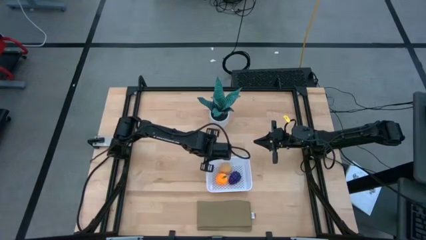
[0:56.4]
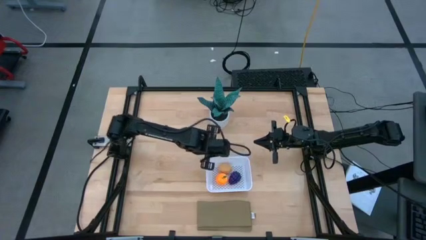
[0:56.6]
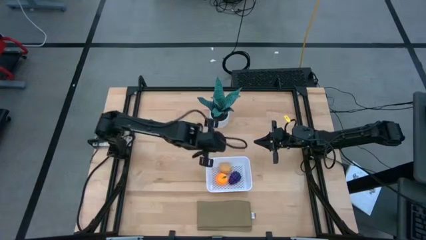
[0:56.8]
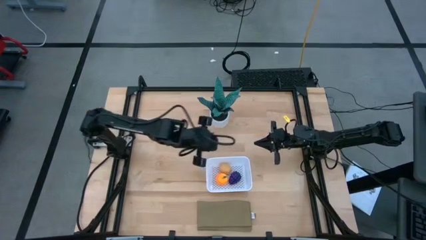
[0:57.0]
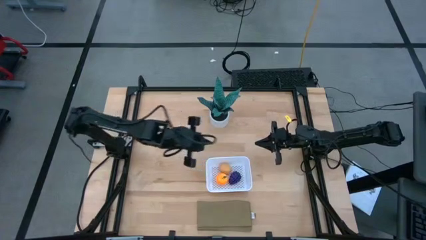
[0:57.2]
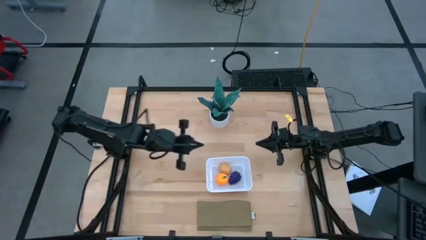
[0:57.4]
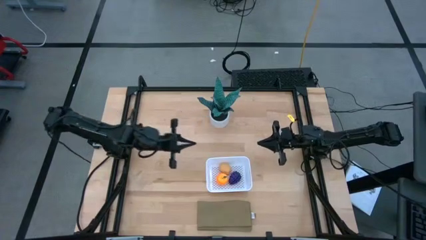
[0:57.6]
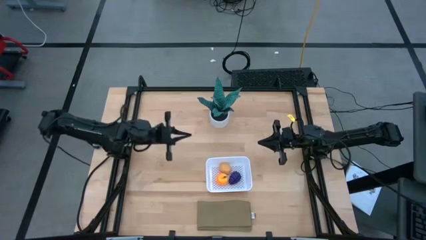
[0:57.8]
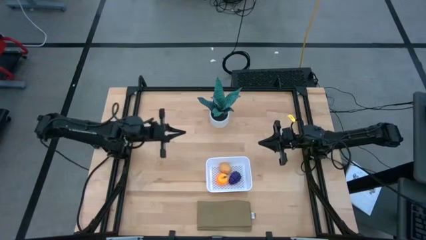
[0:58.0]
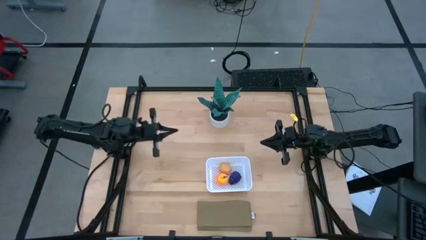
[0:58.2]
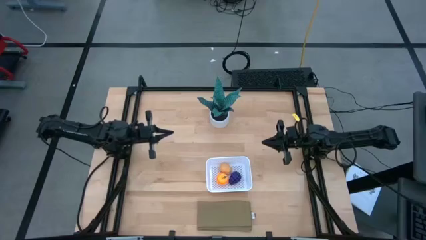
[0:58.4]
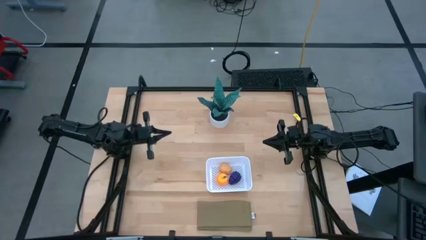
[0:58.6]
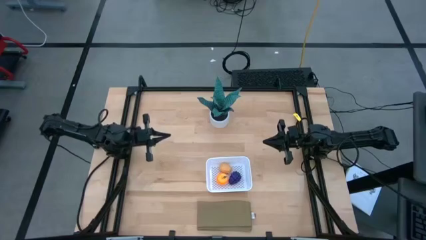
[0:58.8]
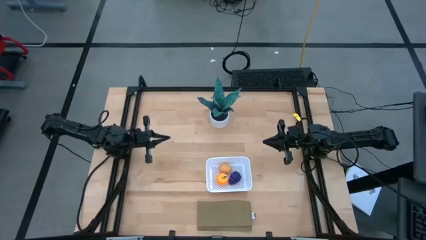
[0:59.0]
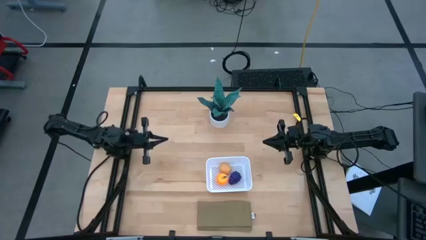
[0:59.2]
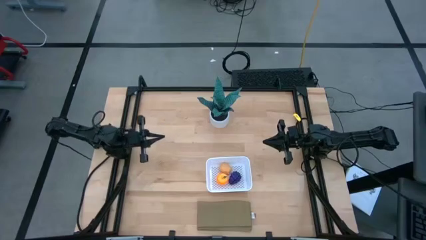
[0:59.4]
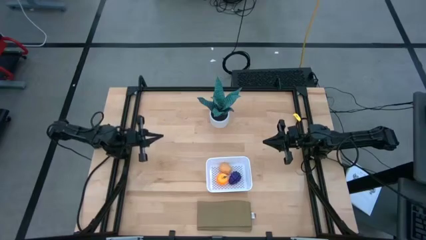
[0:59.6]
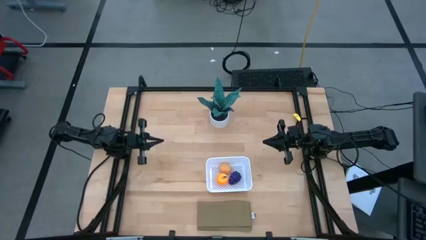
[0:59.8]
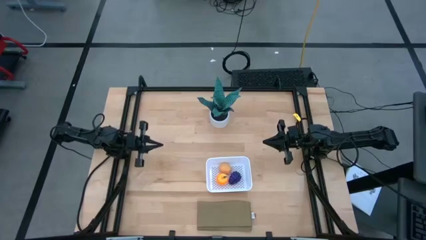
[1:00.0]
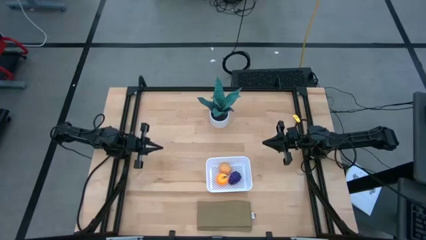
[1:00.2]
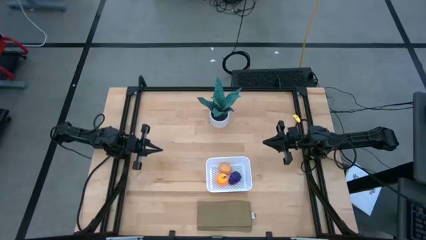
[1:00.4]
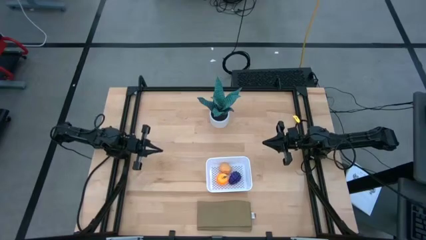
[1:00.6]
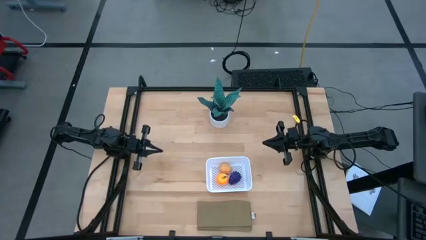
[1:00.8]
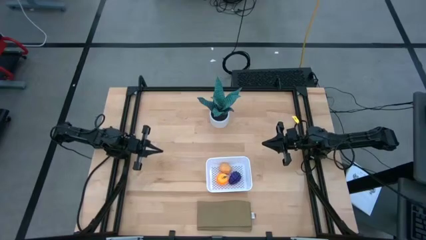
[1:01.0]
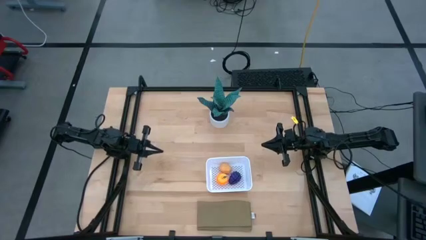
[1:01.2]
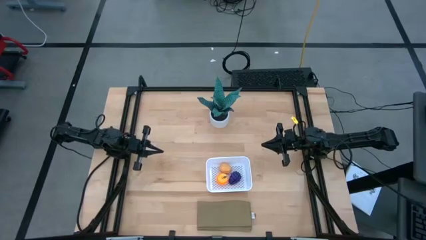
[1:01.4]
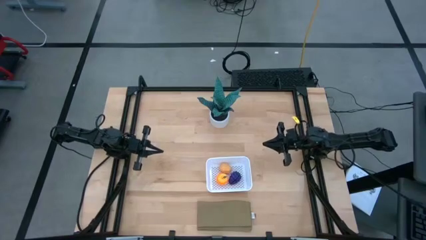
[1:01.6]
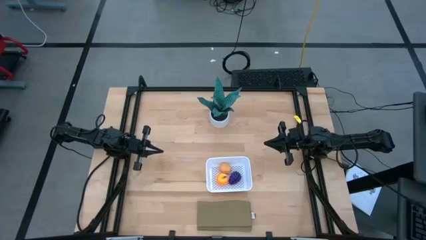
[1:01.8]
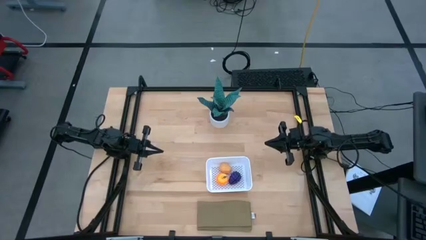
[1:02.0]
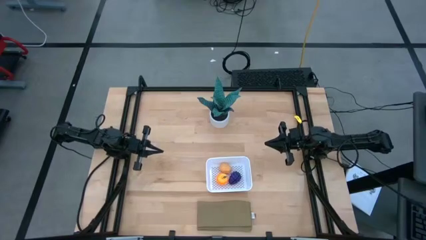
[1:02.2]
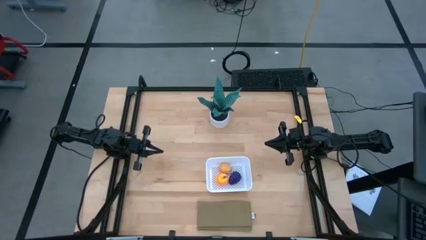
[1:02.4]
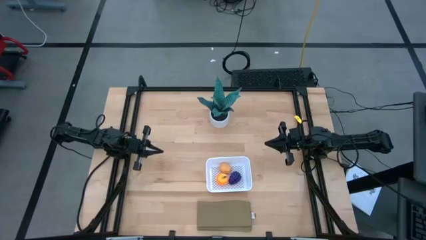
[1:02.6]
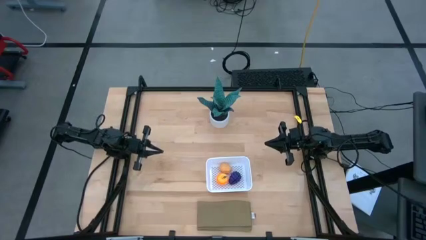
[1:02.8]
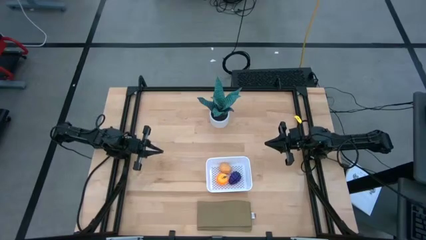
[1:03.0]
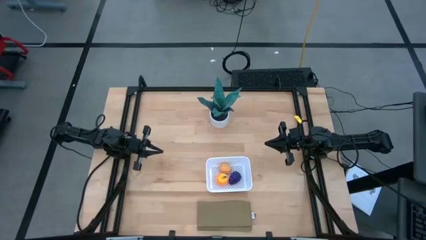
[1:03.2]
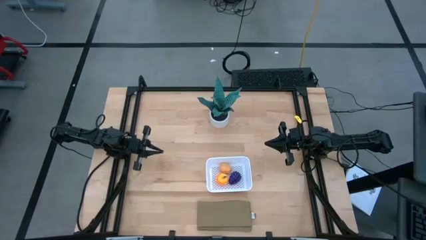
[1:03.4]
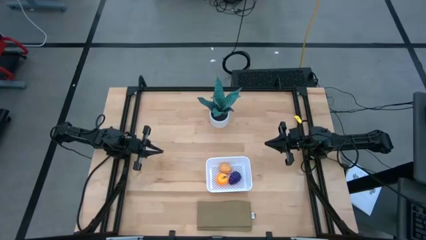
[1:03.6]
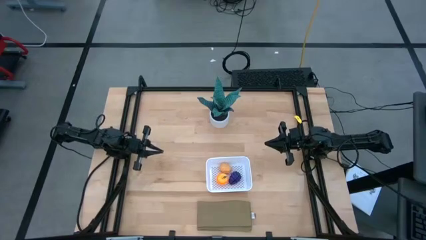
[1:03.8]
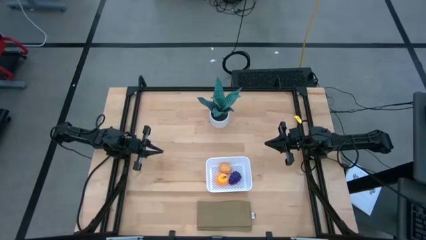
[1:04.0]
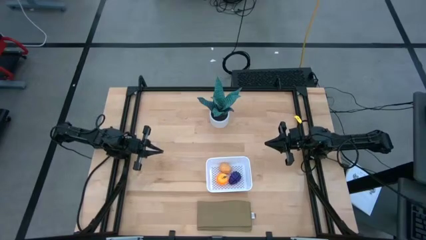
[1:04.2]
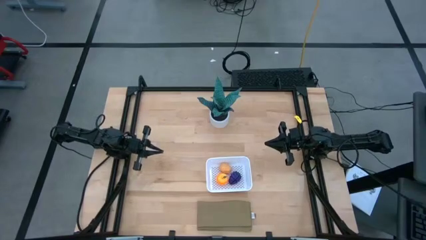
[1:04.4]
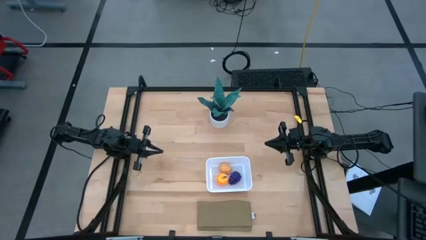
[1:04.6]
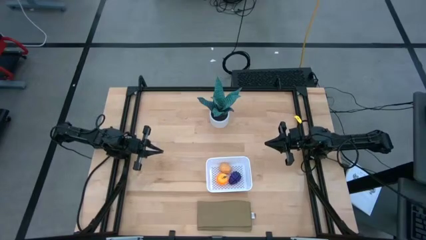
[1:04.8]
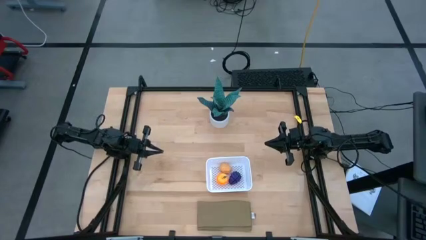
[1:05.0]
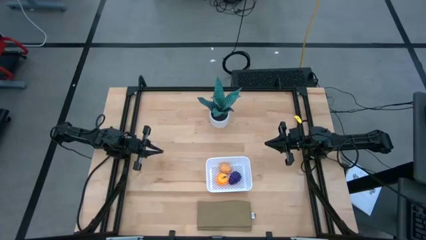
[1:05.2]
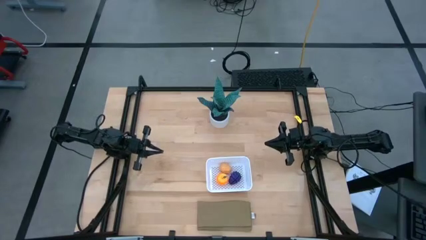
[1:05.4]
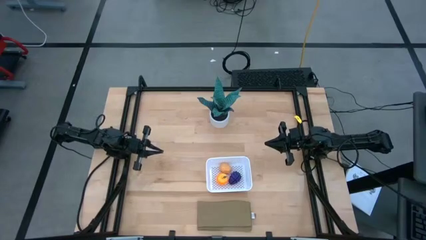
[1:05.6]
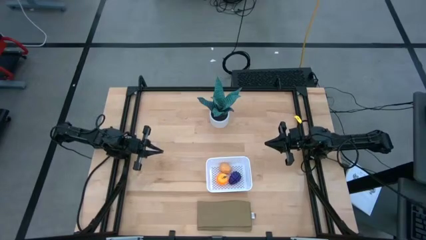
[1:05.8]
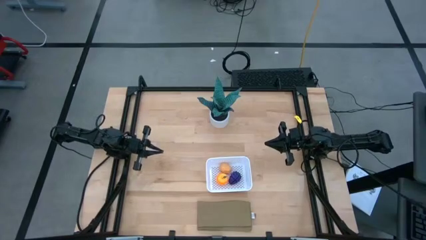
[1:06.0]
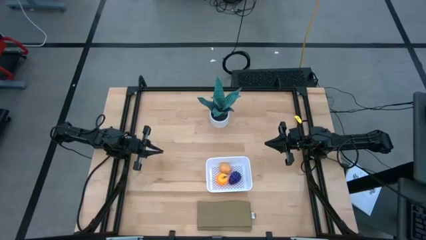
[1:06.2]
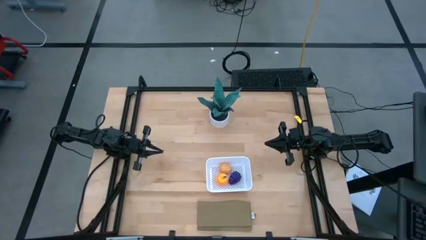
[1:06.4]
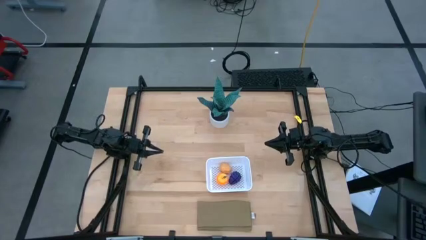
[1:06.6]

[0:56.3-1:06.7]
Task: Pick and placing Produce into tupperware
Return to Home Position
